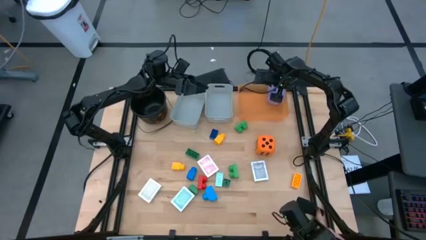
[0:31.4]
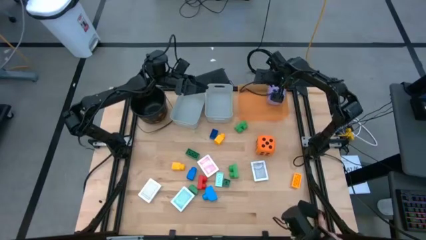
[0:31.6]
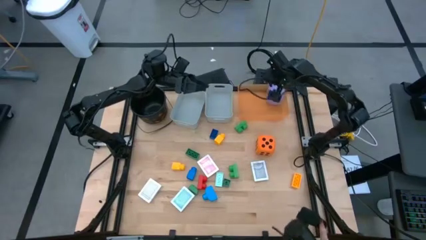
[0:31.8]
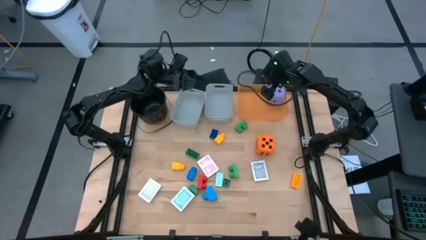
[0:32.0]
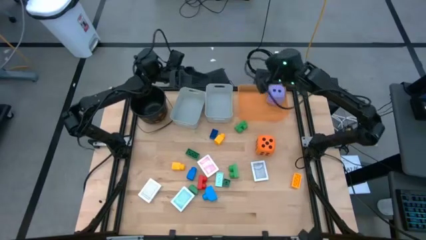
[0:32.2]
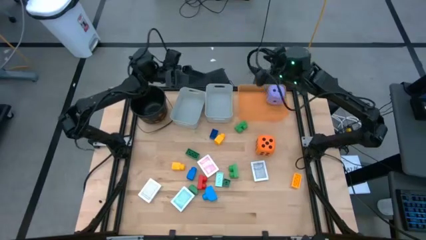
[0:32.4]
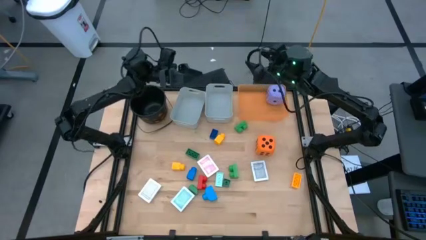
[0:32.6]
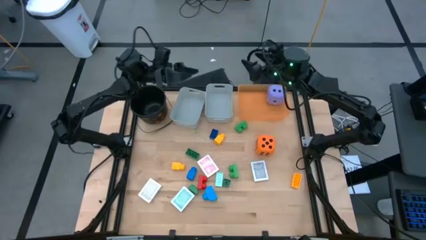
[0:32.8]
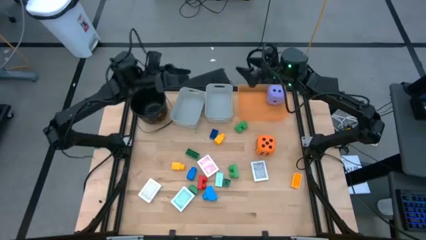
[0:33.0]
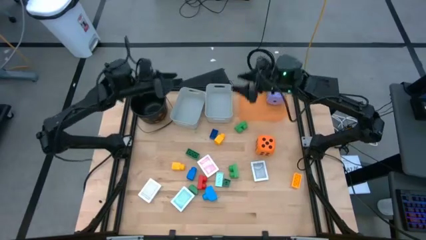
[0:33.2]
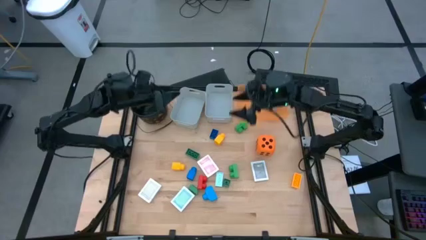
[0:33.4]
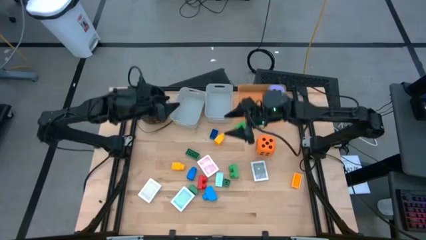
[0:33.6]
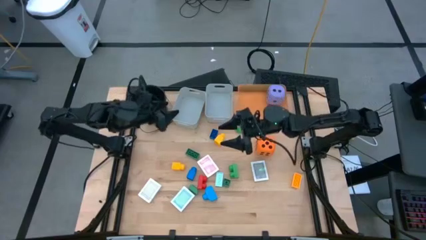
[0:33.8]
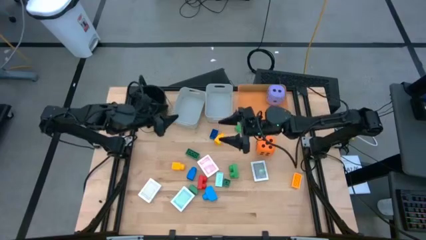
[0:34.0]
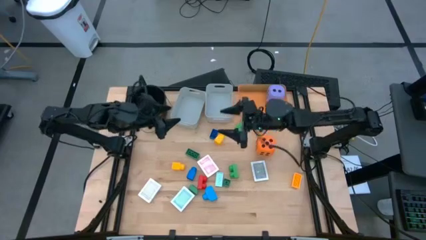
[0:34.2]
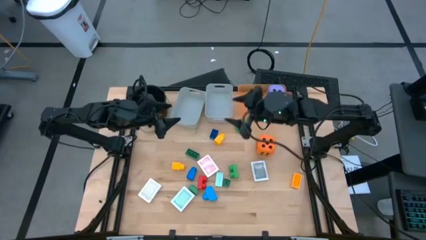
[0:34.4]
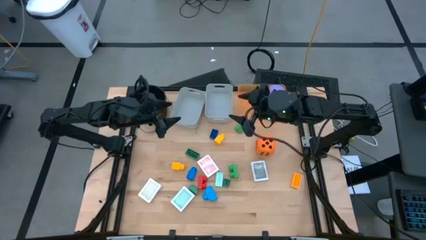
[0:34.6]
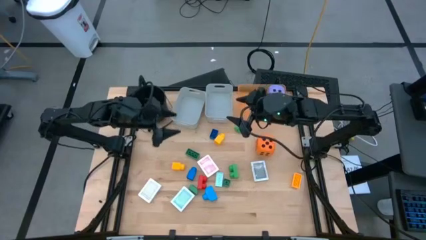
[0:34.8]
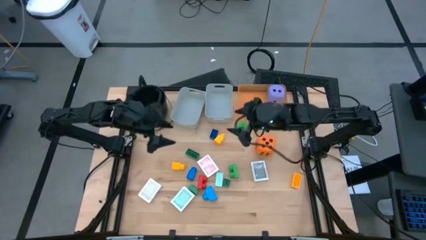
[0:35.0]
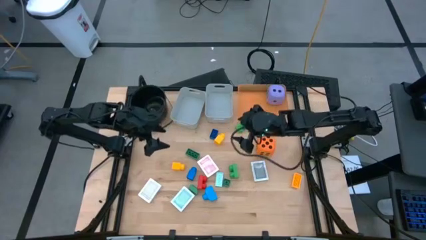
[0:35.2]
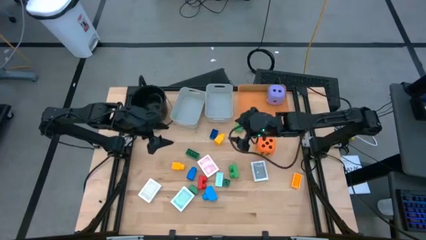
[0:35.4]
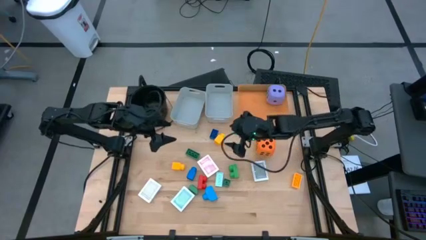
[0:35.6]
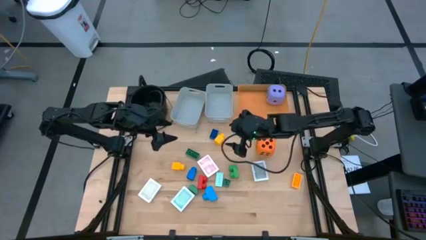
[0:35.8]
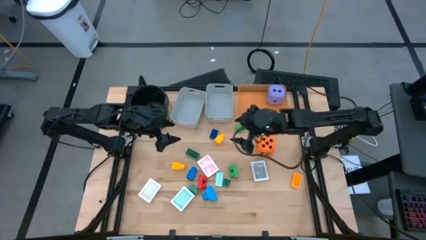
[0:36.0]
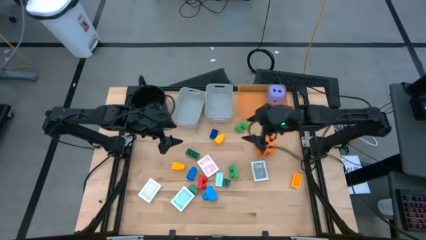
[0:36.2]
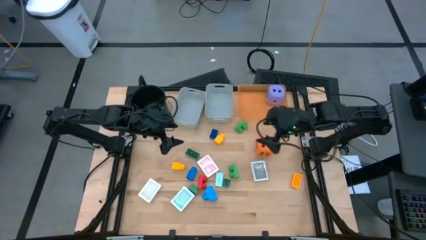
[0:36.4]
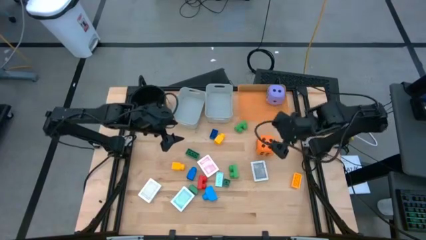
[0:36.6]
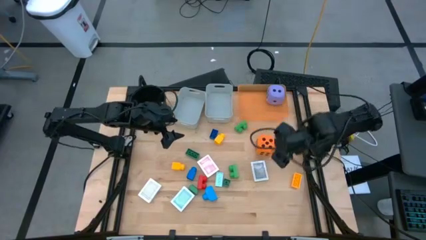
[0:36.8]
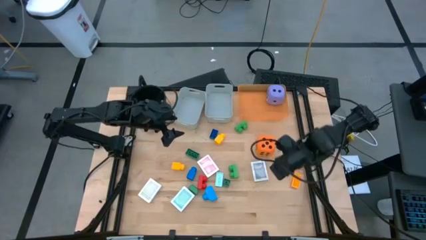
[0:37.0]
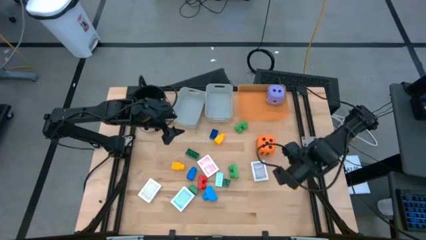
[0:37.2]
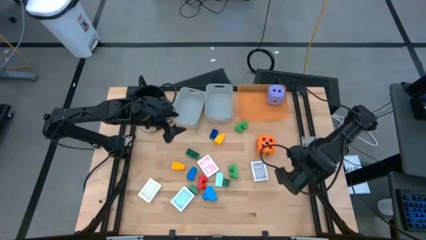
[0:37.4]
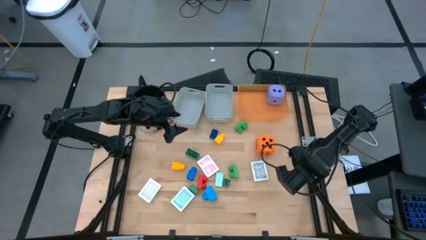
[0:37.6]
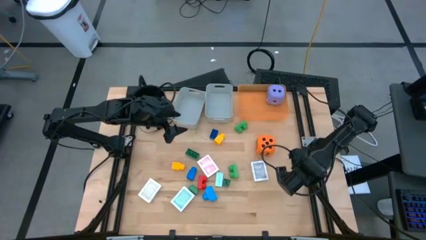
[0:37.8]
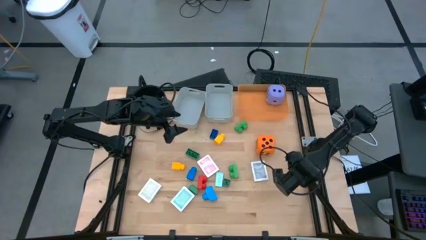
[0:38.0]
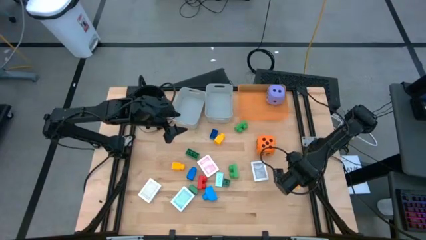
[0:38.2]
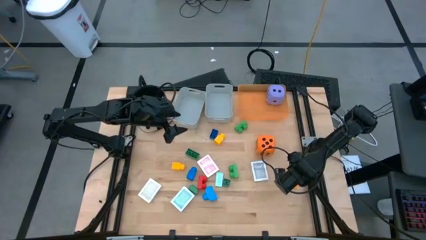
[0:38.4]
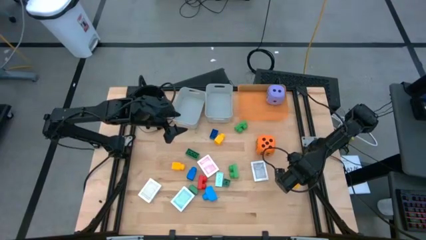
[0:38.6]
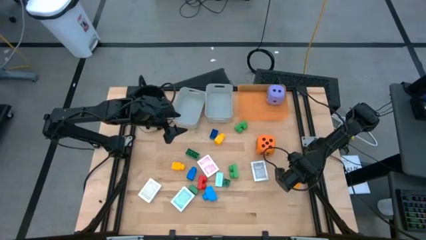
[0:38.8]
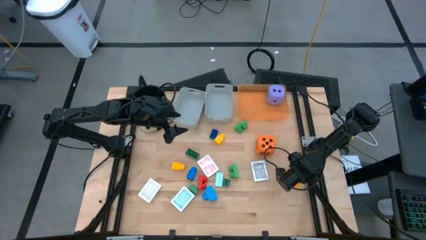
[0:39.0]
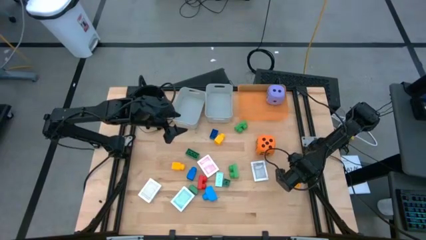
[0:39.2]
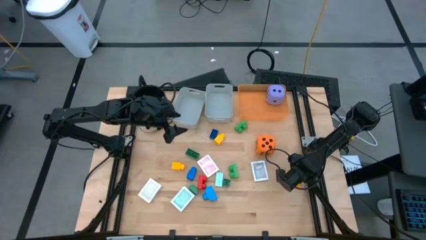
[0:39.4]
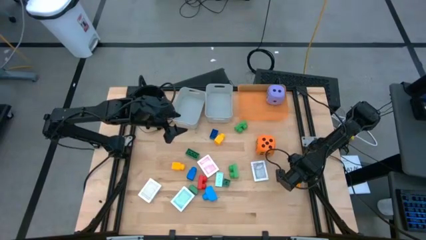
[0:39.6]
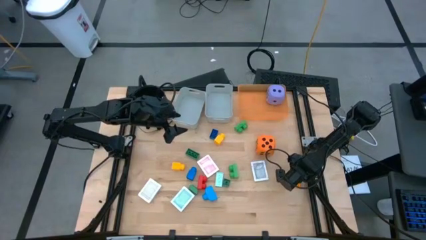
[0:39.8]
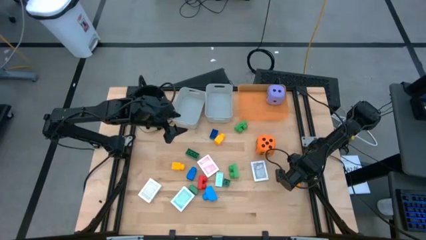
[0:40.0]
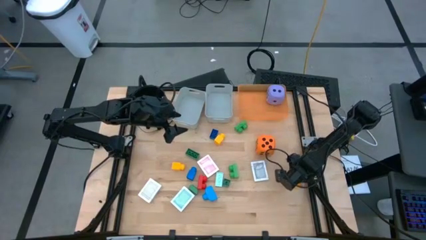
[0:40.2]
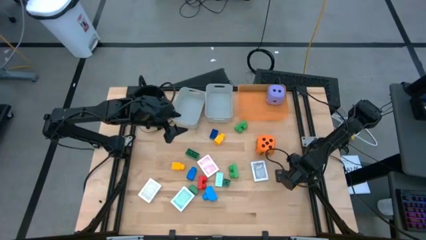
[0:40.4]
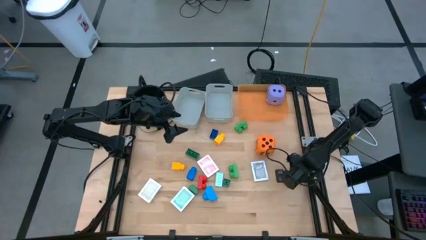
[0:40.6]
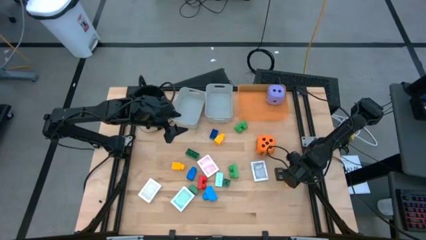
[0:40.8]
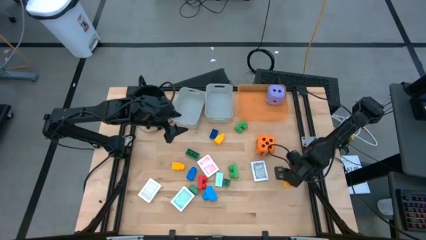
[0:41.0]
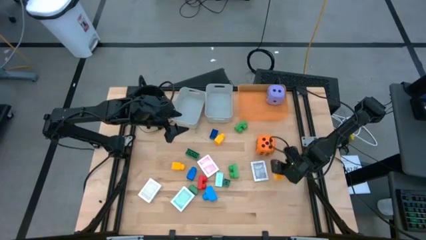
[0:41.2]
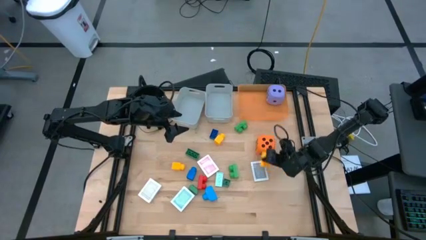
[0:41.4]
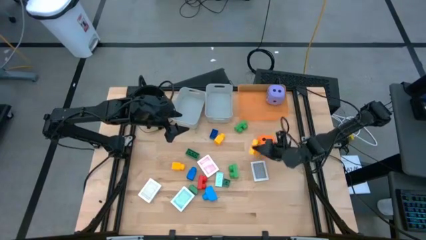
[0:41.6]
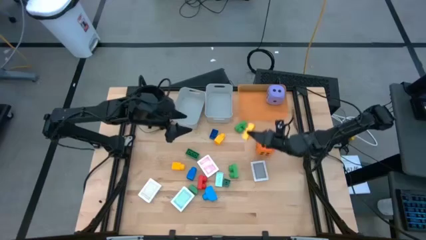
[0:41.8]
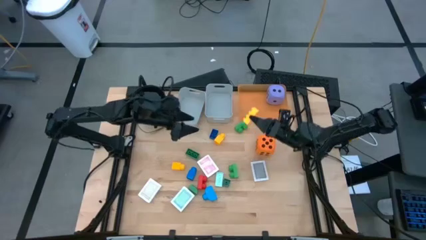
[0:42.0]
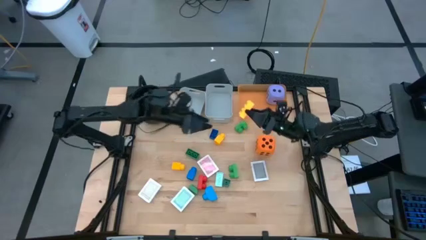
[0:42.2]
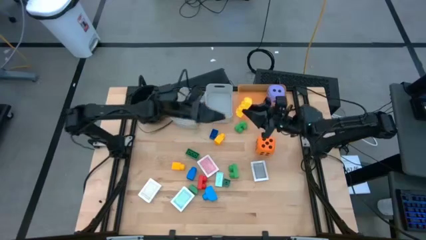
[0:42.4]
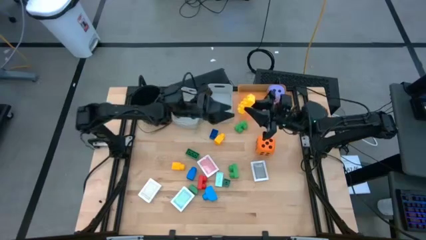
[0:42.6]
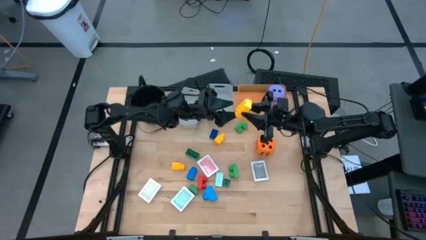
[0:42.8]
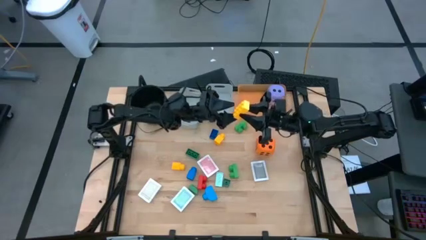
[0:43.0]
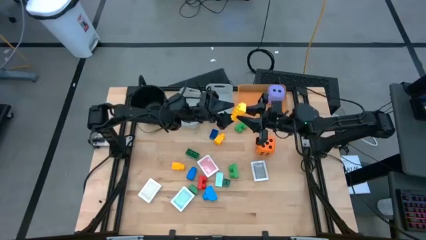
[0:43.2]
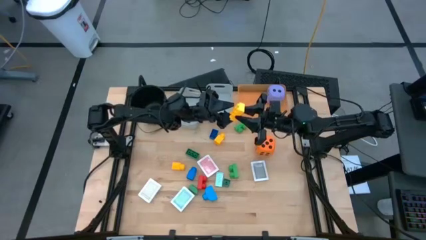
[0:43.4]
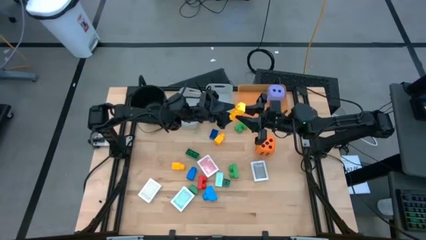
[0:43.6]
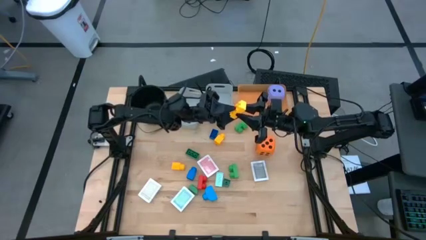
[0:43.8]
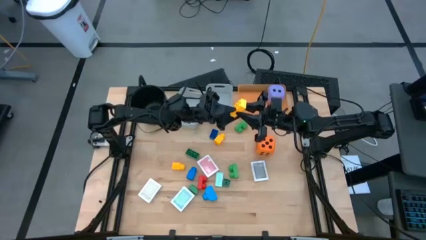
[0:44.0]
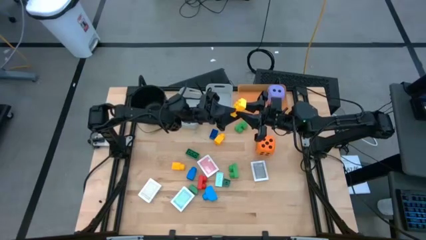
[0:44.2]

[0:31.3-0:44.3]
Task: Pick & Place Toys
Put the yellow game piece into the left gray bin
